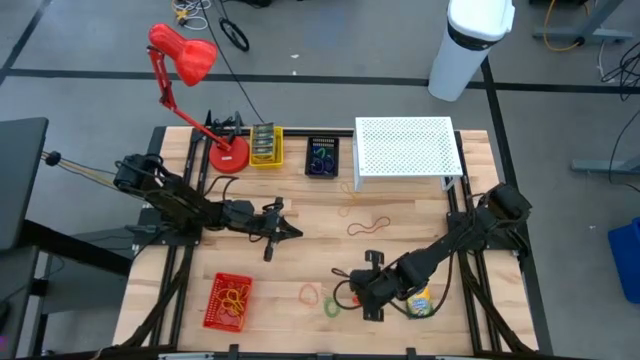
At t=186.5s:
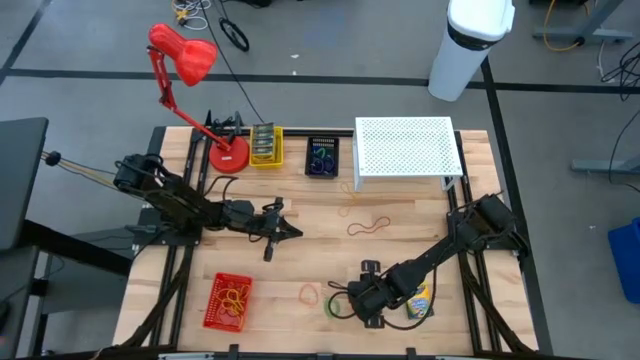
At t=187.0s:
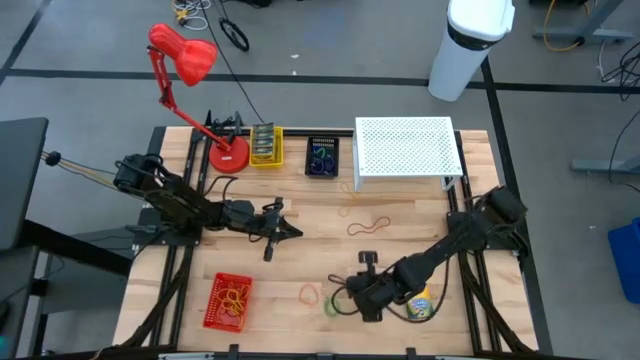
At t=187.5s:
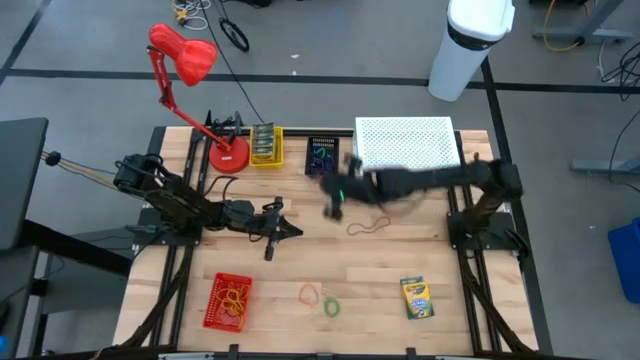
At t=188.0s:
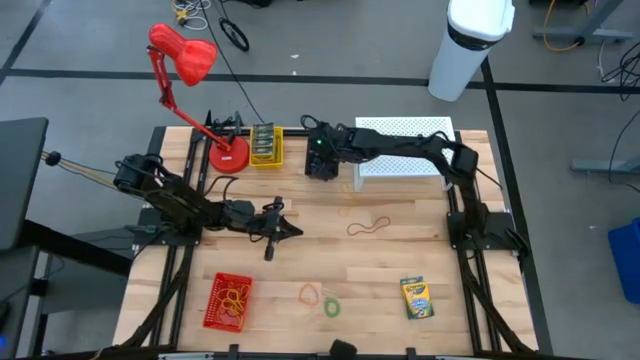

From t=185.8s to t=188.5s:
Task: Pick & Place Office Desk Supplies
Put the orange rubber spring band into the red bin

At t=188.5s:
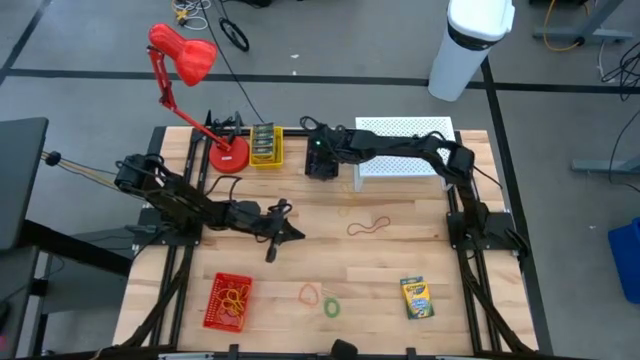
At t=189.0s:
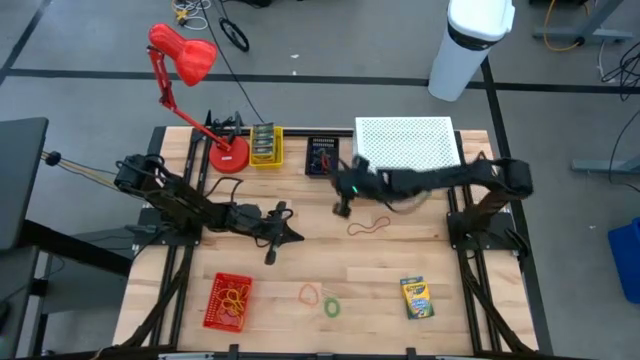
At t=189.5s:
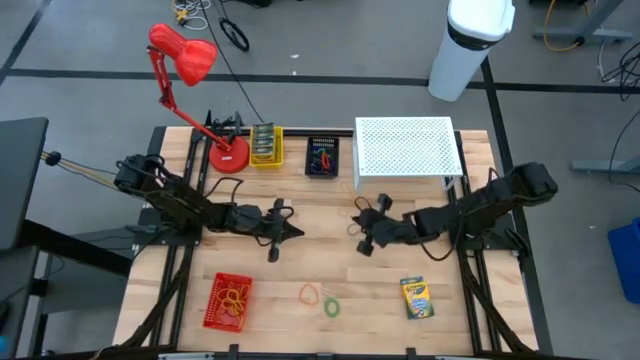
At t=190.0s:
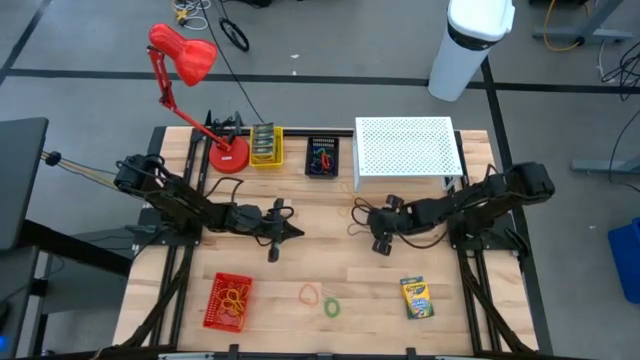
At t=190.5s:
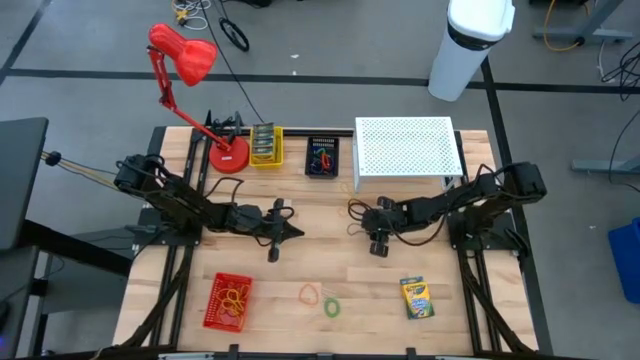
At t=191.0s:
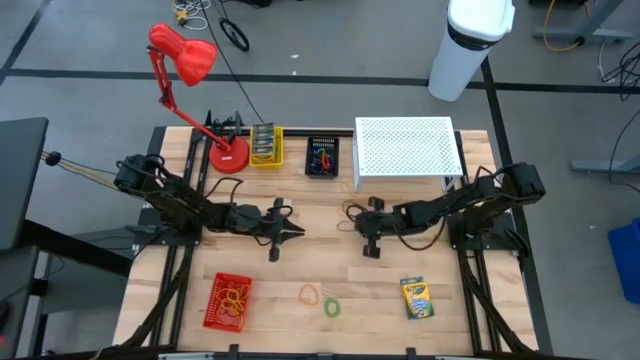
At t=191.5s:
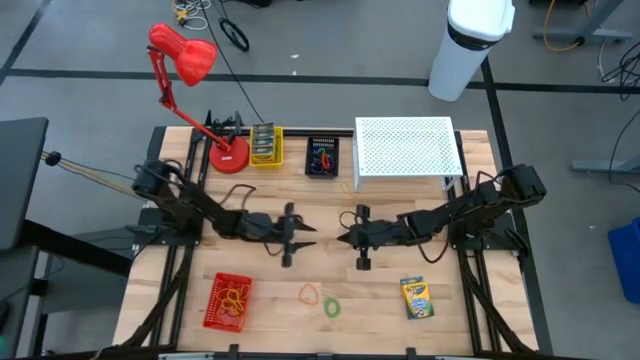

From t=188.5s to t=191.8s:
Put the red rubber band into the red bin

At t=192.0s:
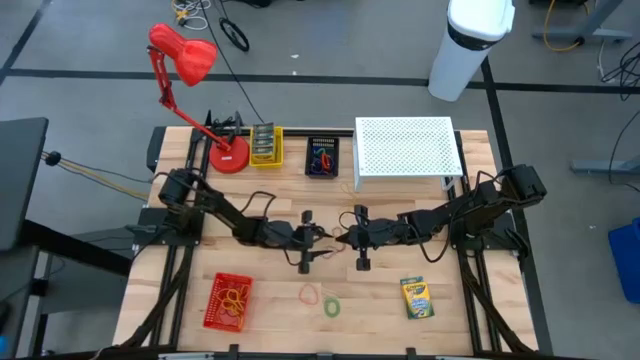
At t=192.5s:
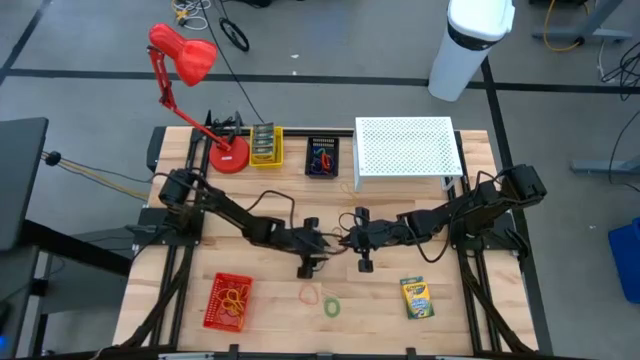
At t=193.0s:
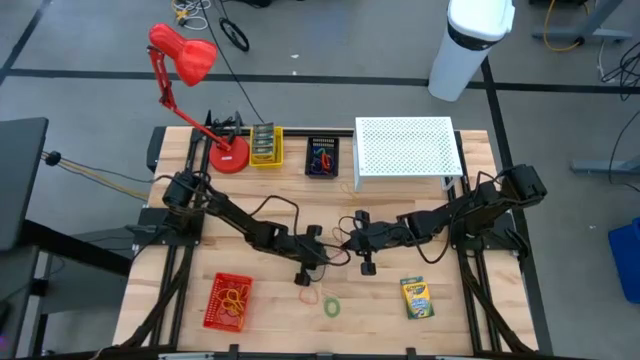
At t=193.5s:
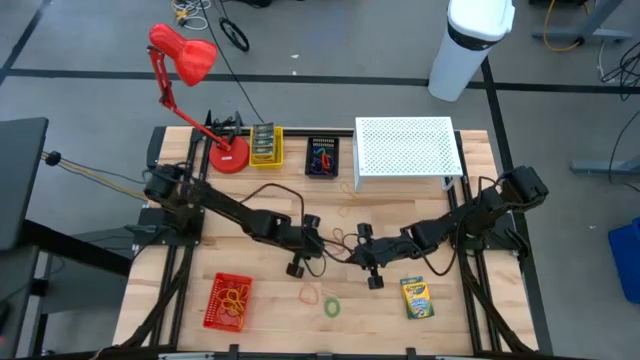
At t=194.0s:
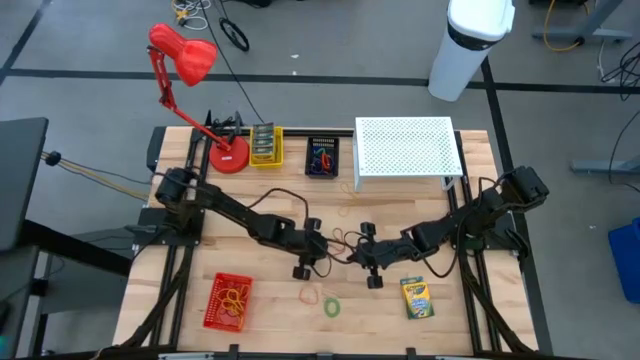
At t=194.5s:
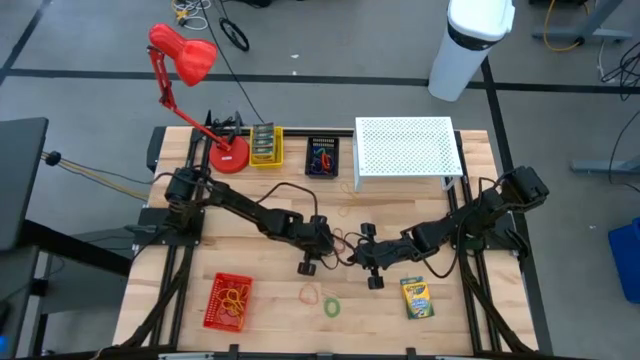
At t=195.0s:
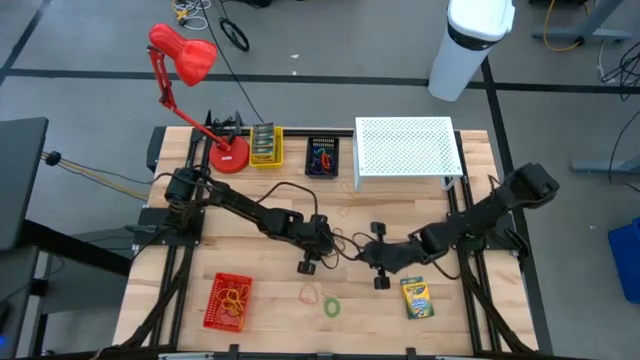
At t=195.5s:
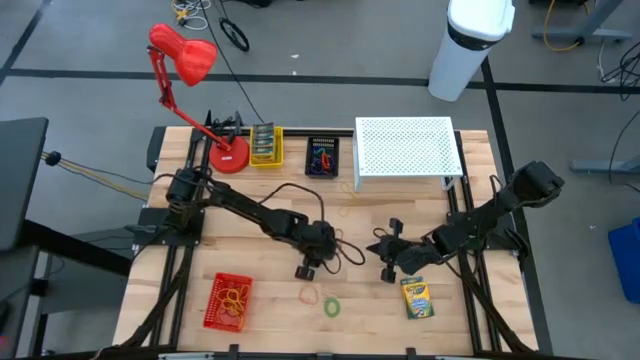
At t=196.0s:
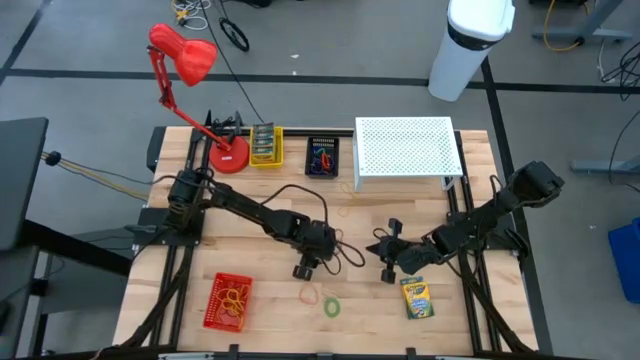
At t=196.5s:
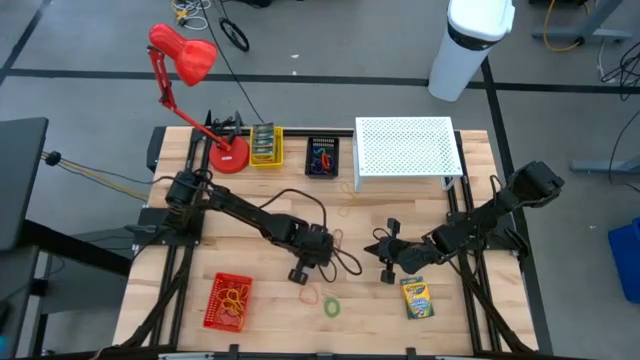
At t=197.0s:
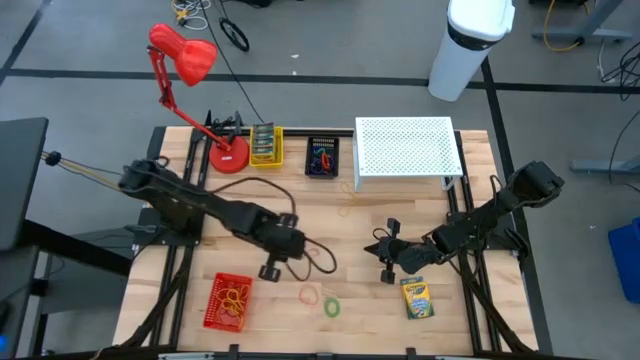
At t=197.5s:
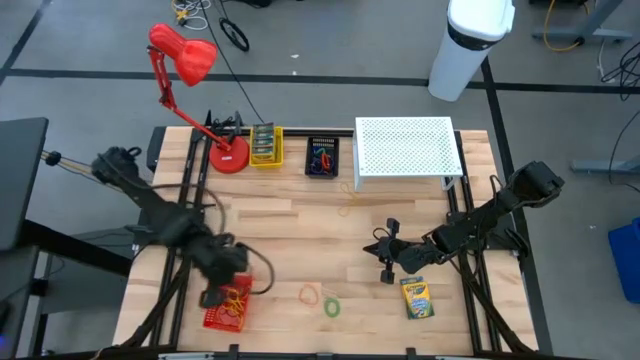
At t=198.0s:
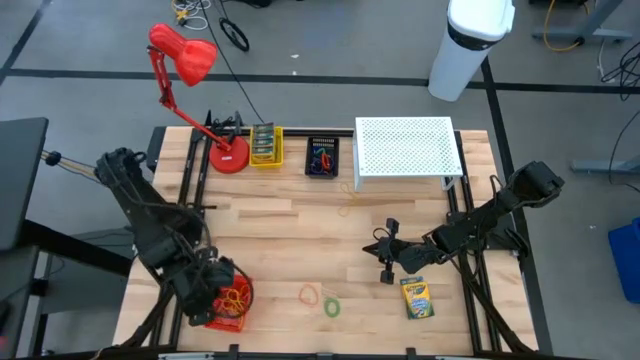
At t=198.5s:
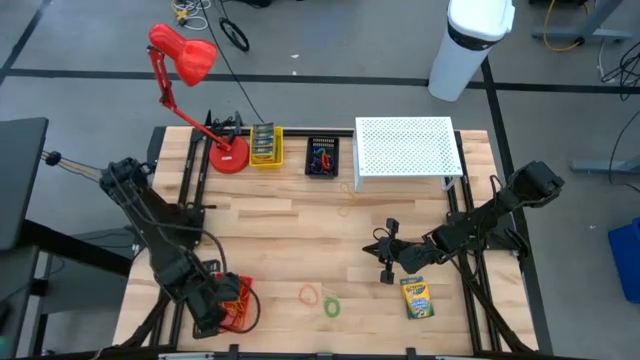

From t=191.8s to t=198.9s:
Put the red rubber band into the red bin

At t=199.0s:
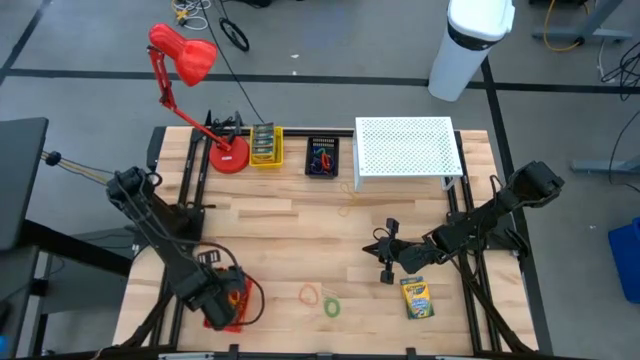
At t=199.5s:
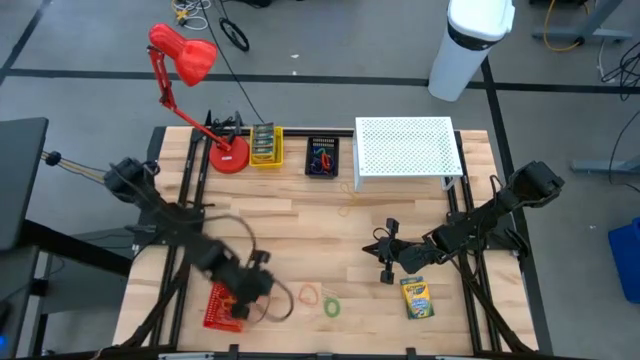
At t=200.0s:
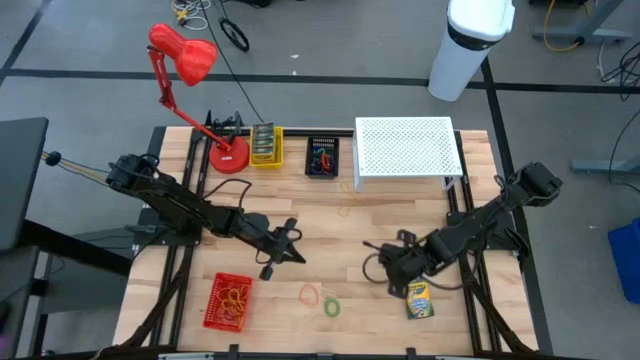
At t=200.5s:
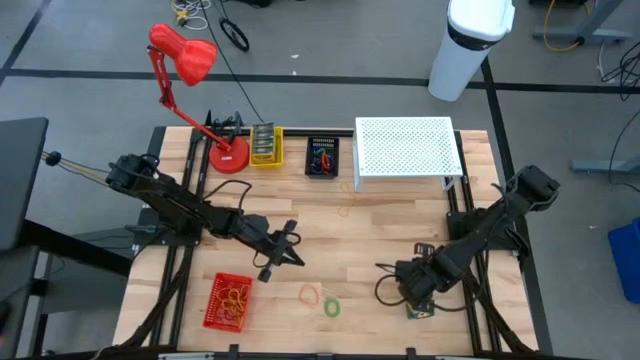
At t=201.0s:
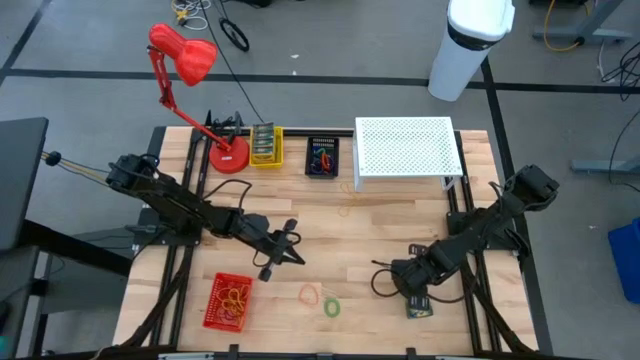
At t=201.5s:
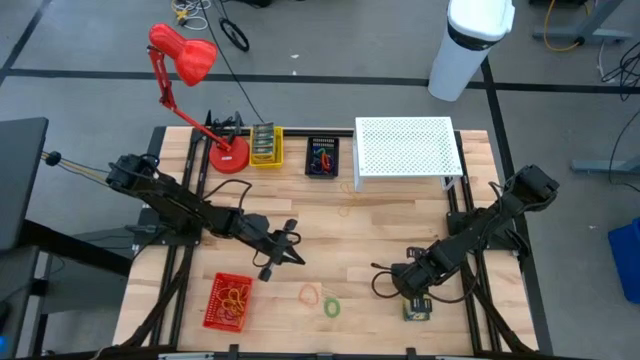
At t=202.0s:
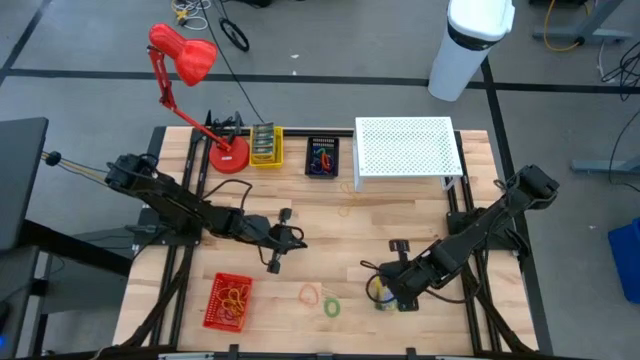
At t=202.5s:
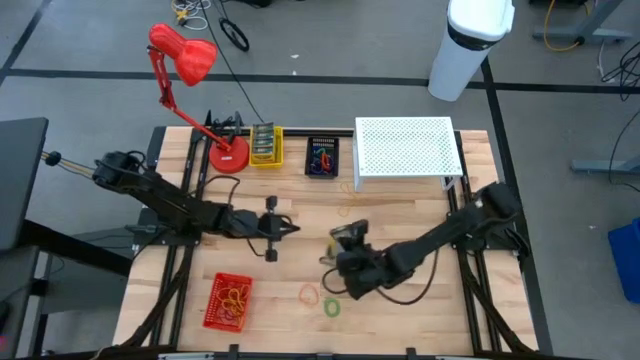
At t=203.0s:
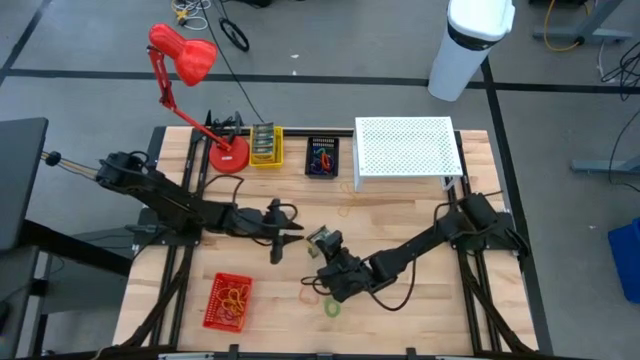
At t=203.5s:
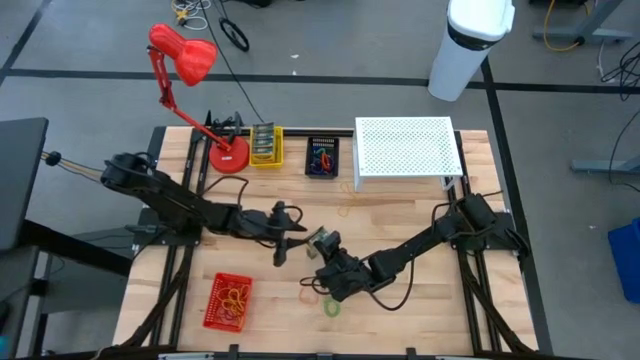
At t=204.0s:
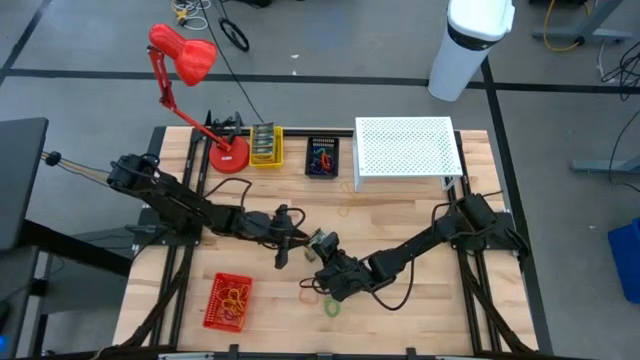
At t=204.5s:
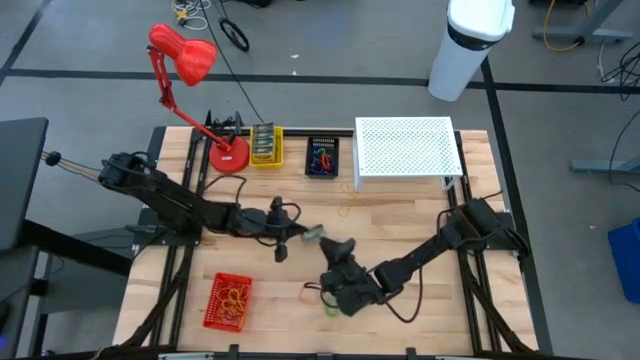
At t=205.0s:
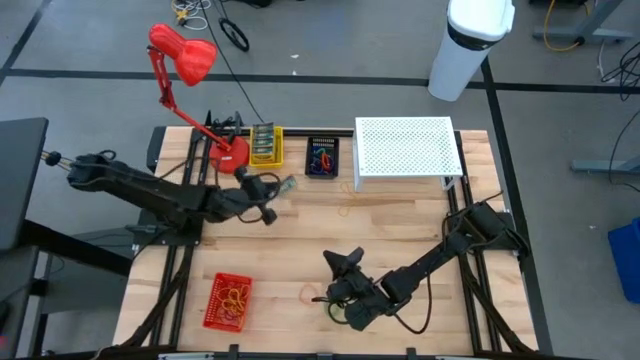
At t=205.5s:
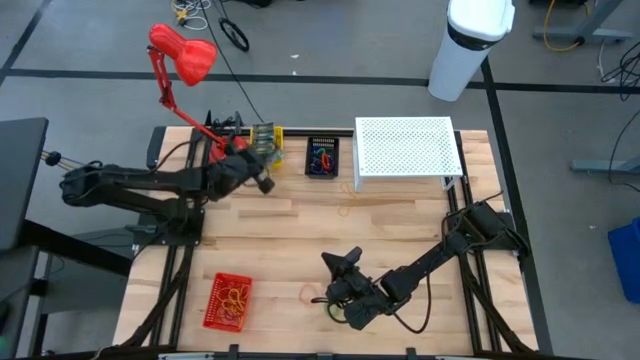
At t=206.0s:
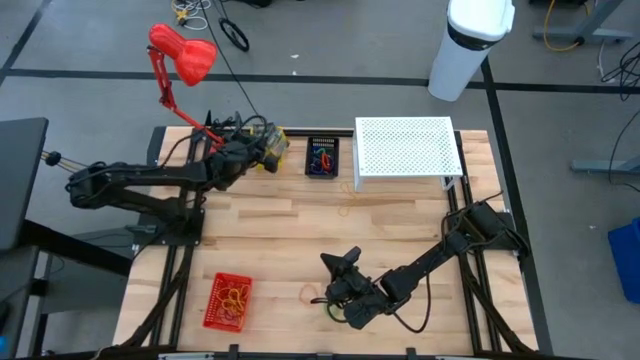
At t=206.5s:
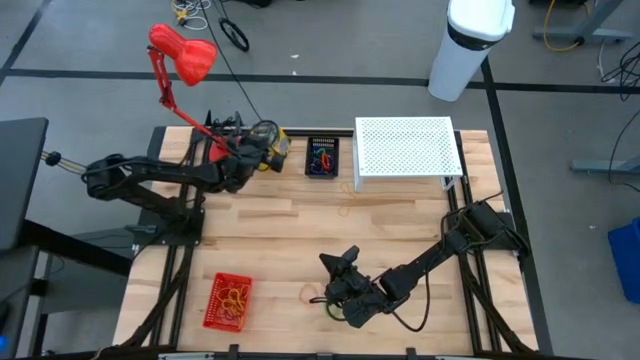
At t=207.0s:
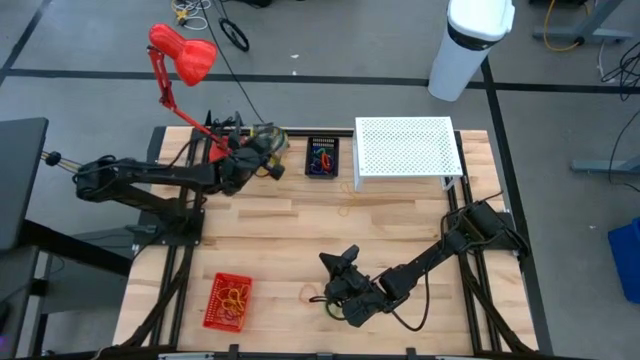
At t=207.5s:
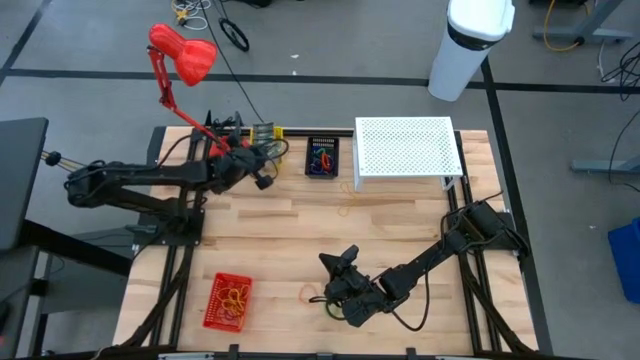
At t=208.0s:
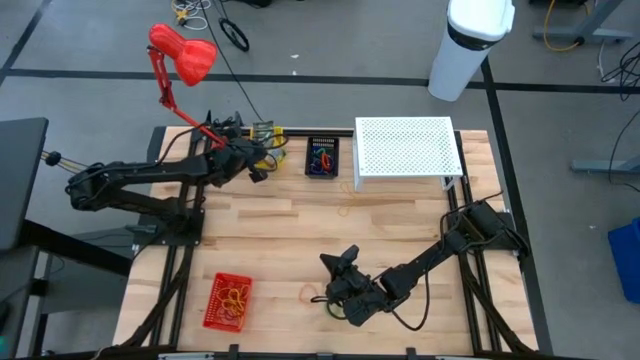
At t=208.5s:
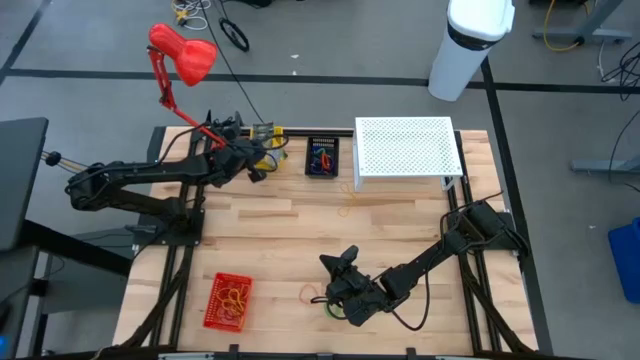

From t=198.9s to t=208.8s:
Put the yellow crayon box into the yellow bin
